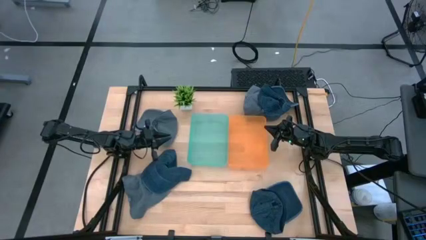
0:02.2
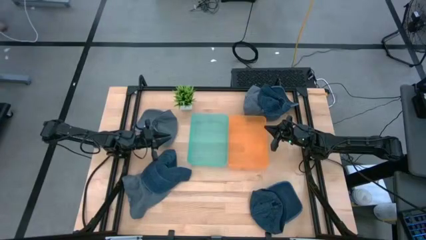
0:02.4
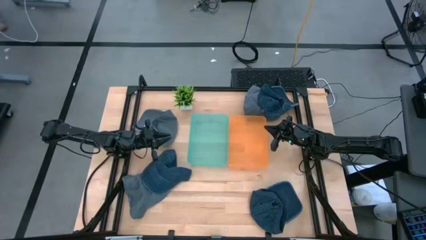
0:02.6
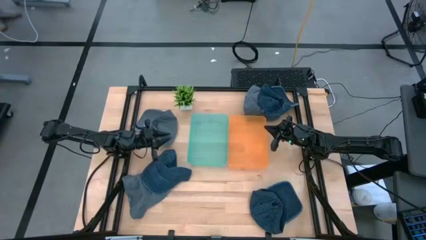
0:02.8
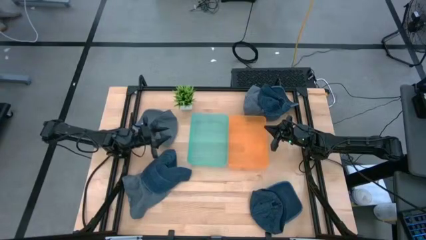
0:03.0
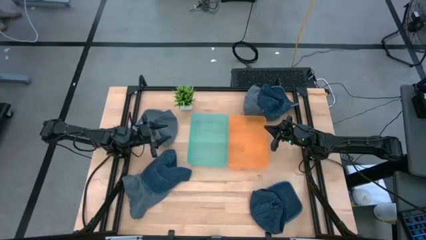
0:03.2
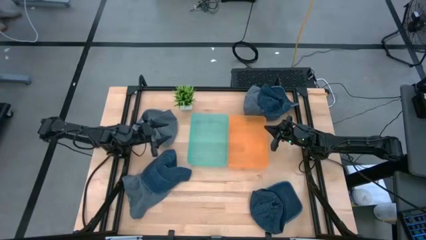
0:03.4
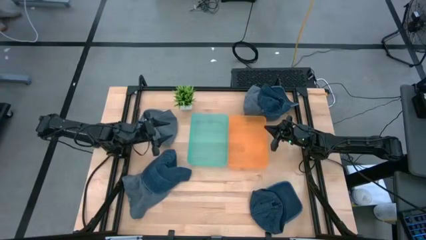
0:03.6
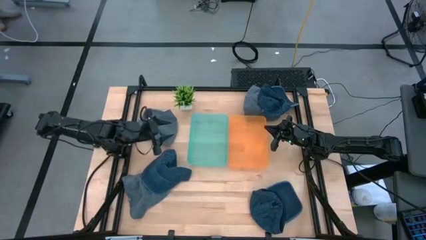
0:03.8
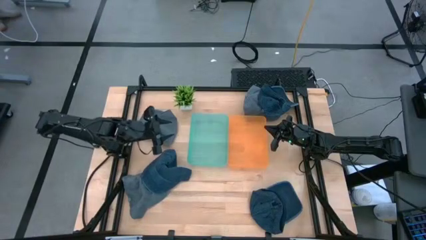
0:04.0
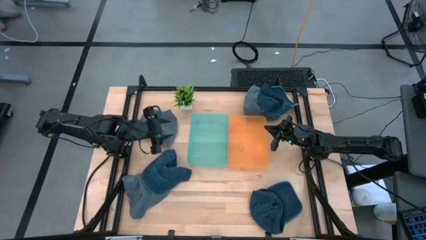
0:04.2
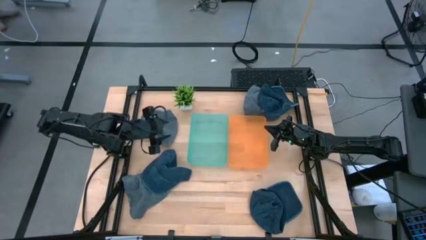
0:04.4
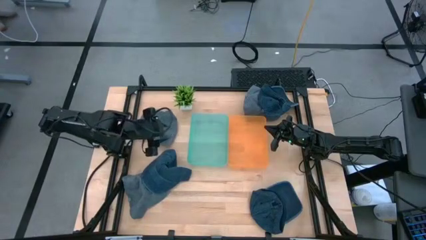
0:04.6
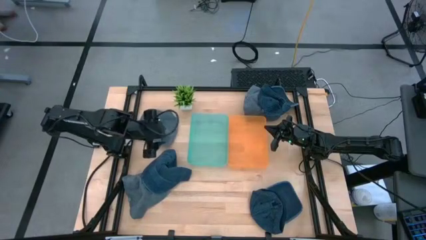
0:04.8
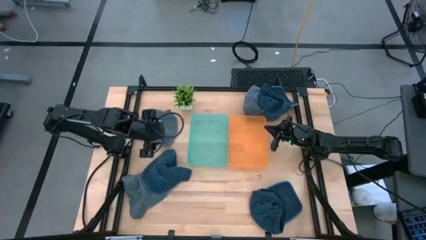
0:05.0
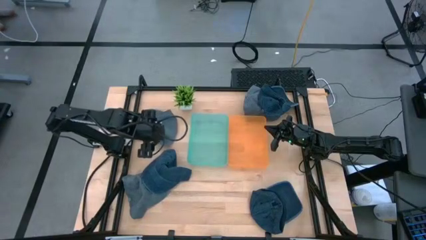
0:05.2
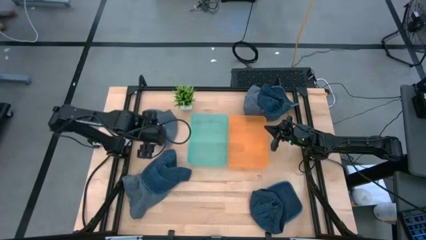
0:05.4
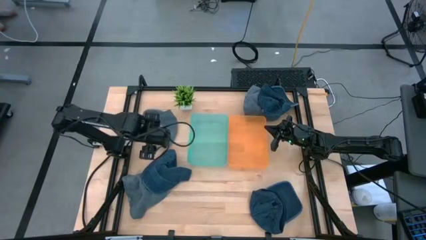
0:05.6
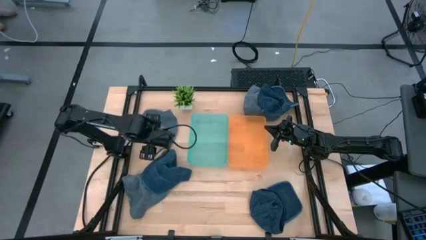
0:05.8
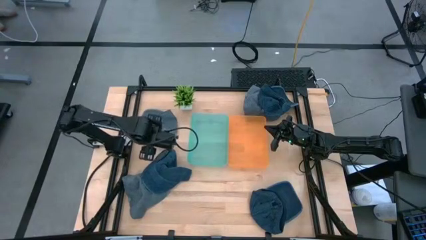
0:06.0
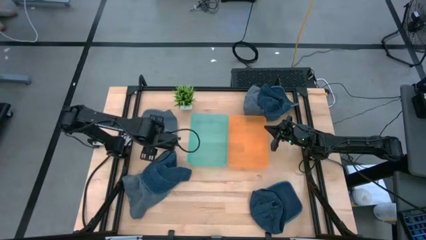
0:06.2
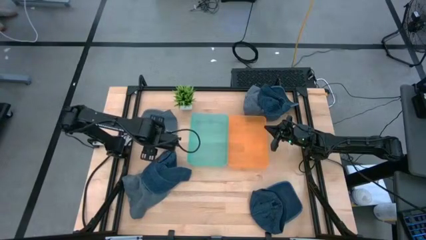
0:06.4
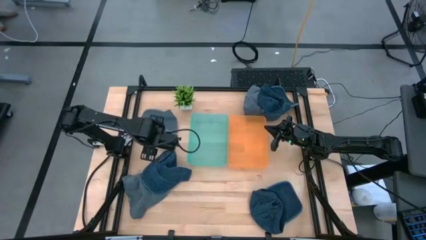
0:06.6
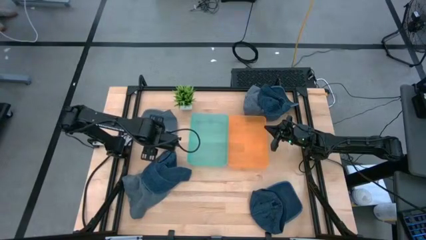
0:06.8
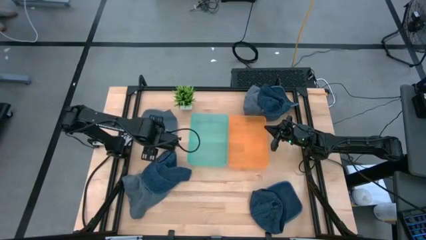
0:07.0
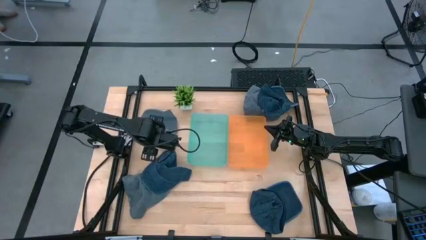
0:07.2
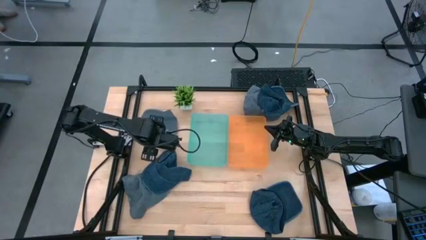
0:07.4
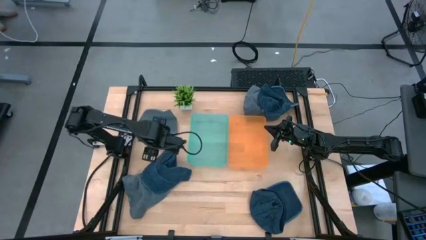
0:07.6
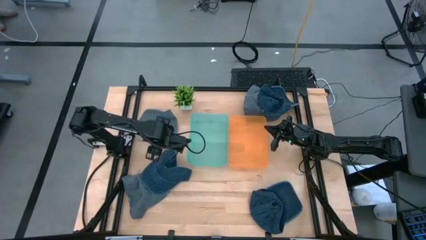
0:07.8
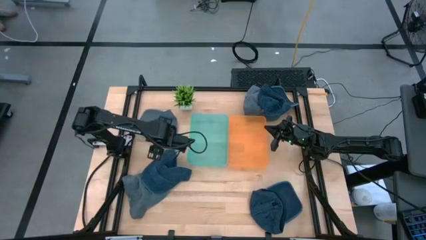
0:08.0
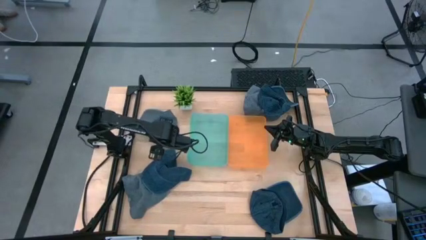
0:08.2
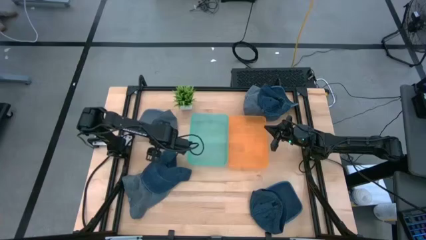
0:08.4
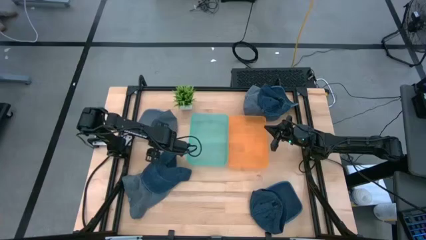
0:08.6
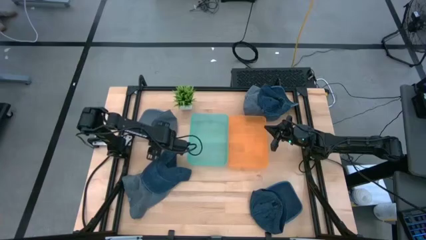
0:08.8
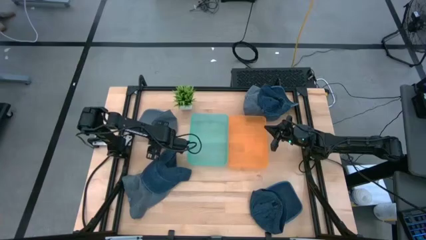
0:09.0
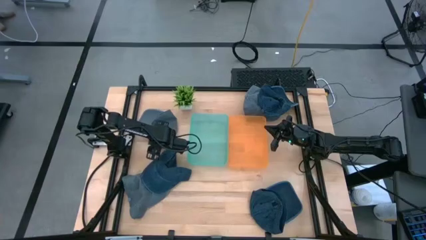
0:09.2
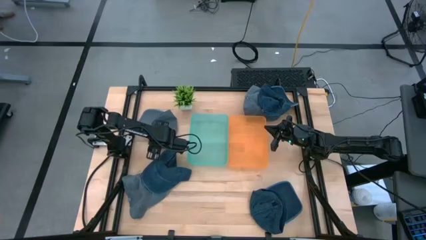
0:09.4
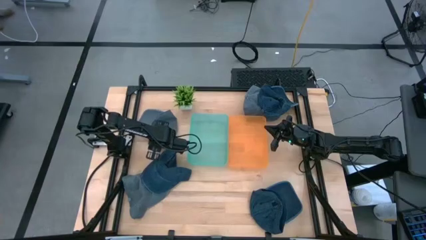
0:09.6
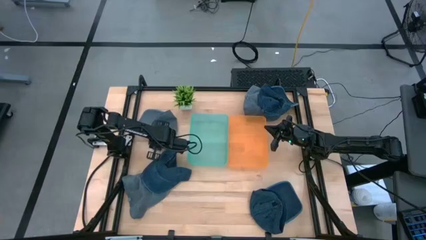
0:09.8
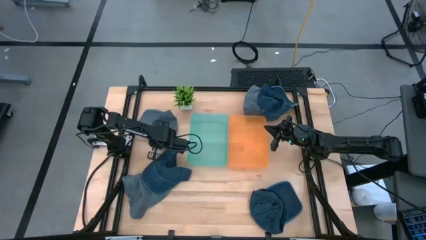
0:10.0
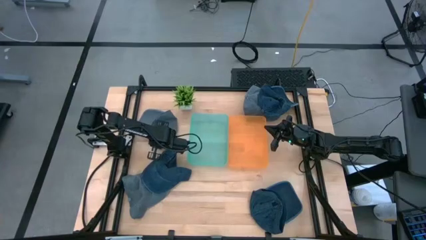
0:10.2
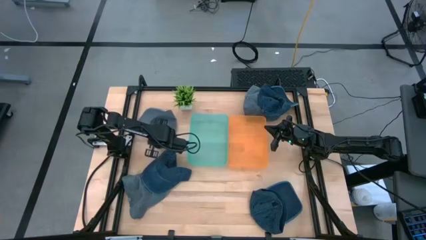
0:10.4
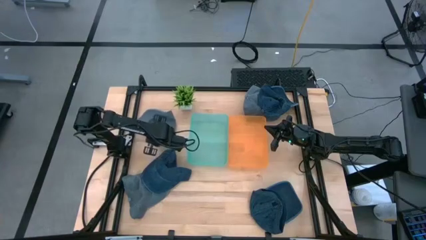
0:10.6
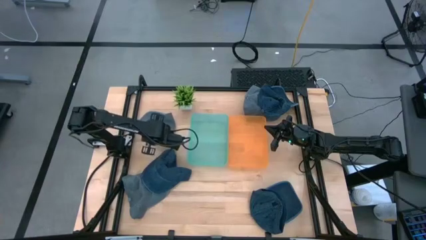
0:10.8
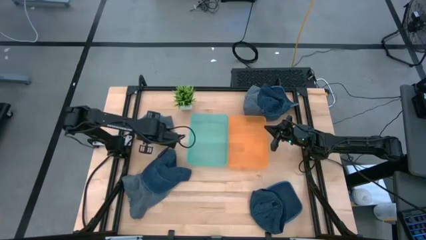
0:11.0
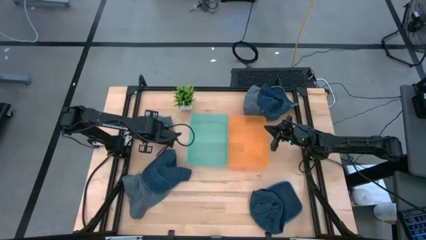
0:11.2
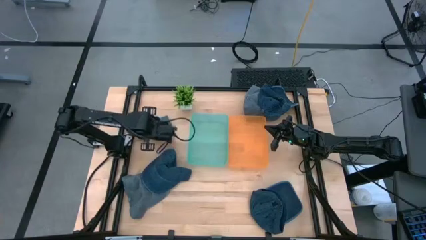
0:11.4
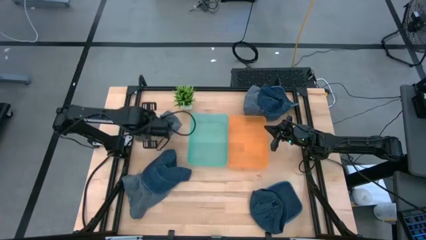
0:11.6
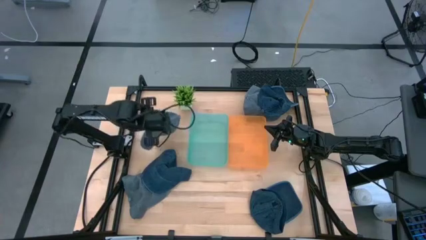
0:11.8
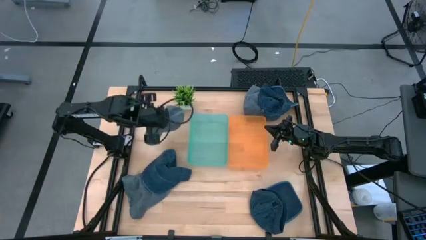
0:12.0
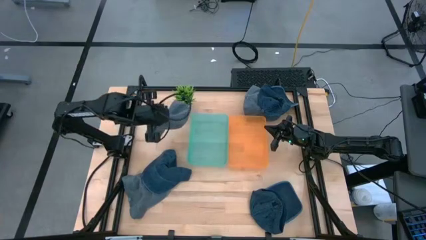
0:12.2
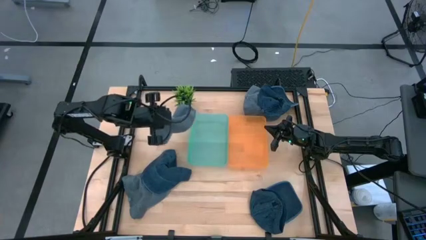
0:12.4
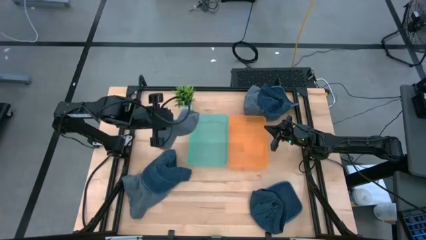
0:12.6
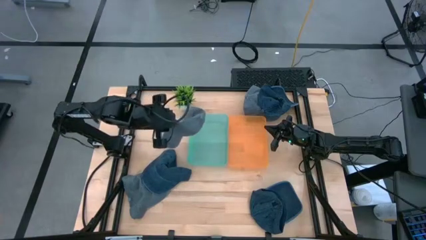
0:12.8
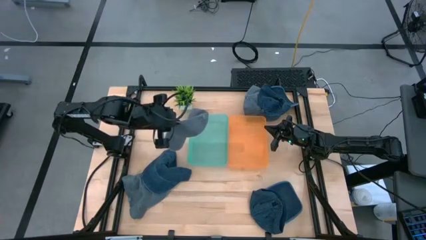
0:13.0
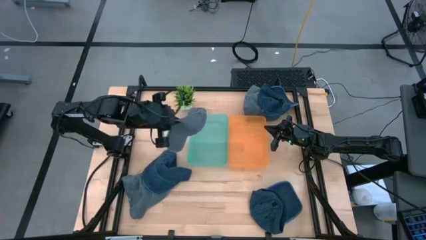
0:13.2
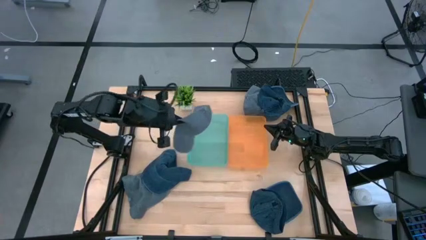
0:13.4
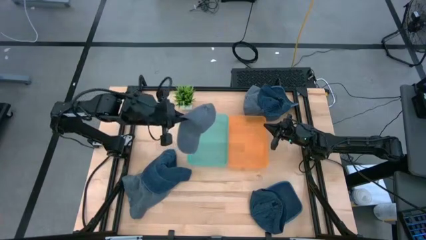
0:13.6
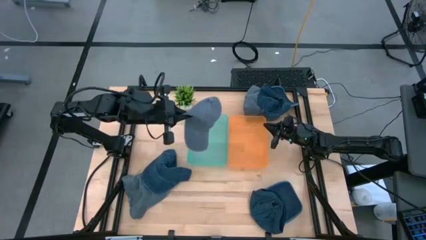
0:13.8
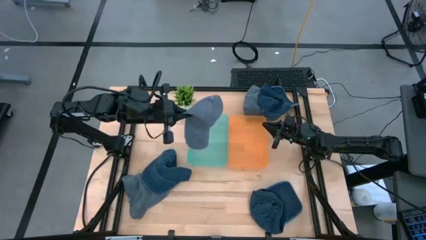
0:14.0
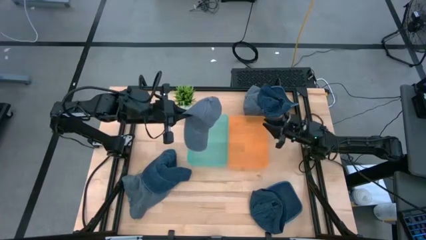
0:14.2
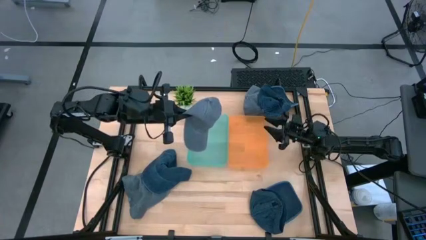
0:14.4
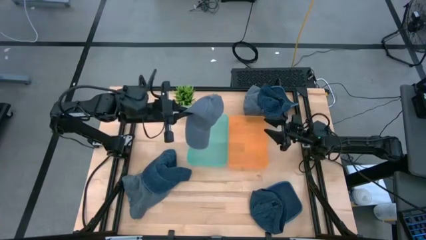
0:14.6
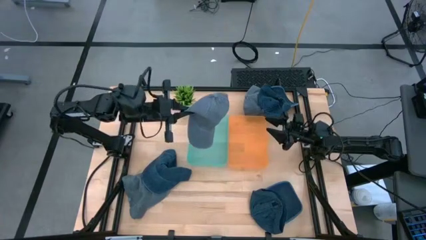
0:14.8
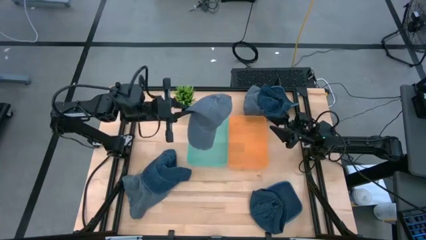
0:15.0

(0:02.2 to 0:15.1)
Task: Pick & Place hat
Put the middle left gray cap into the green bin
